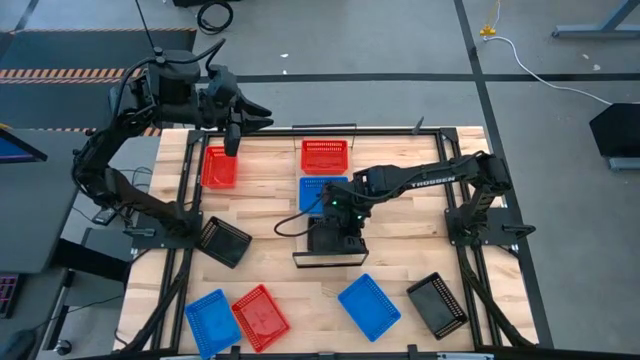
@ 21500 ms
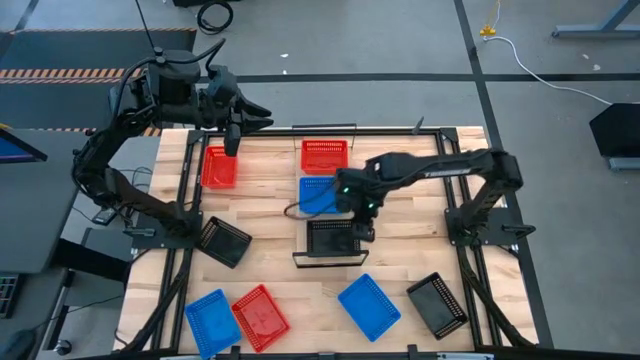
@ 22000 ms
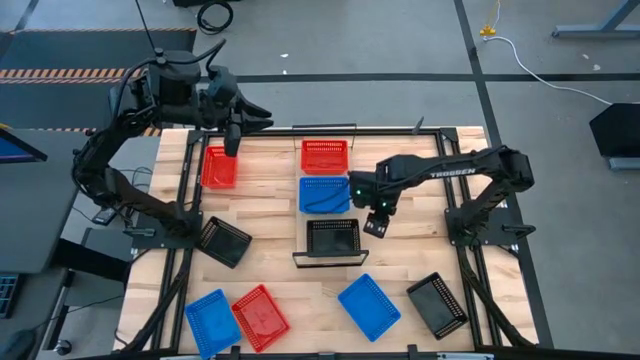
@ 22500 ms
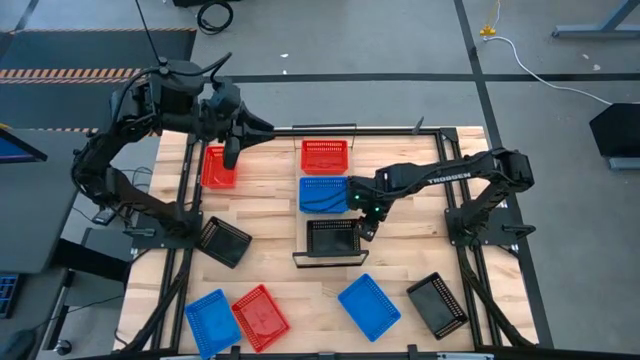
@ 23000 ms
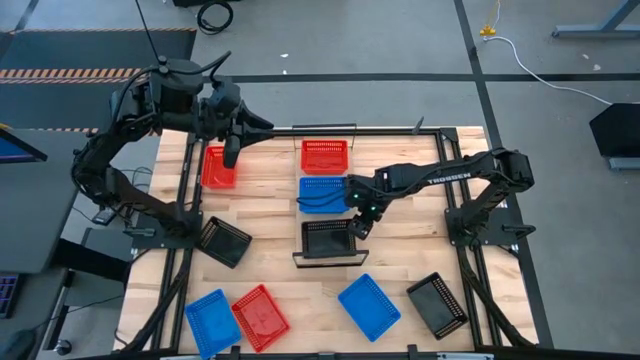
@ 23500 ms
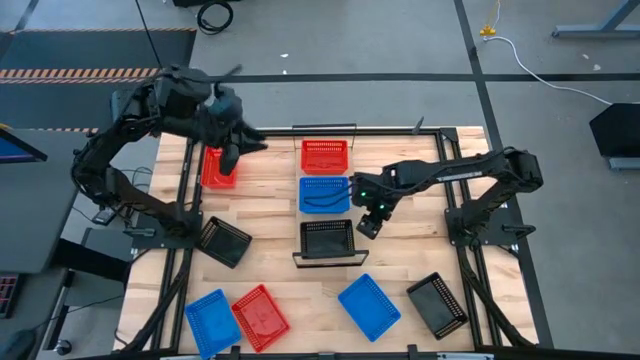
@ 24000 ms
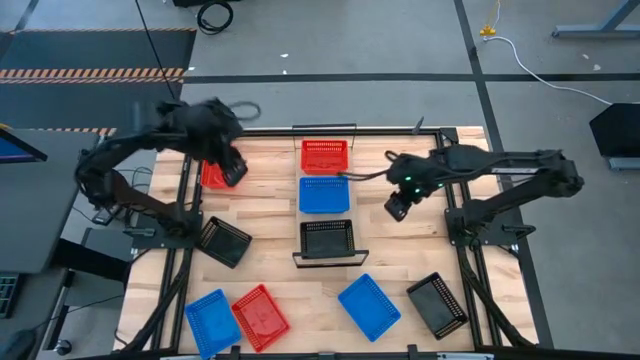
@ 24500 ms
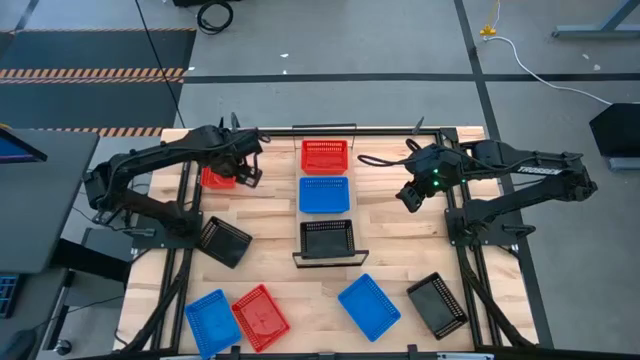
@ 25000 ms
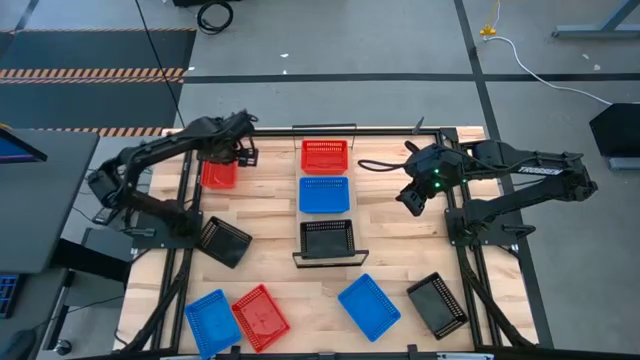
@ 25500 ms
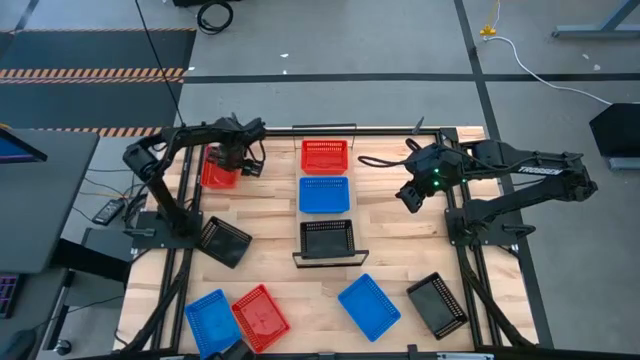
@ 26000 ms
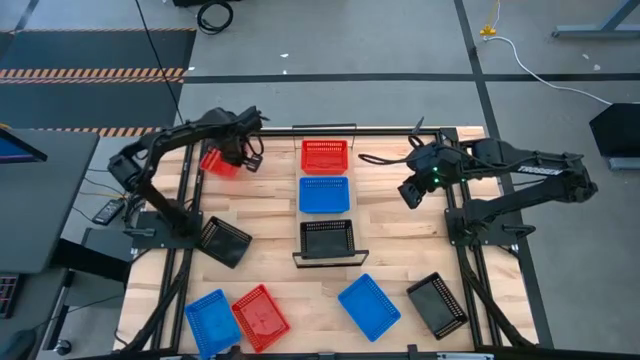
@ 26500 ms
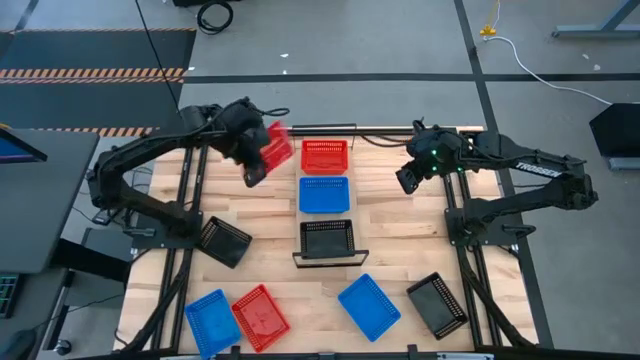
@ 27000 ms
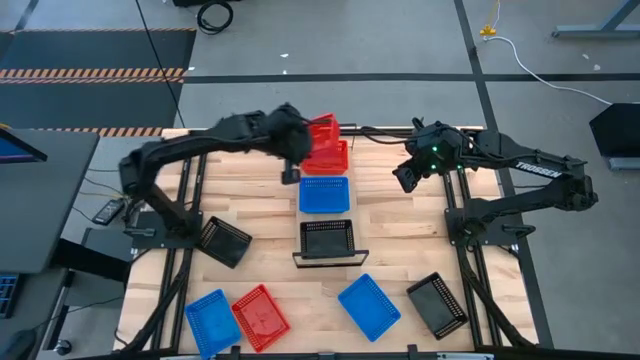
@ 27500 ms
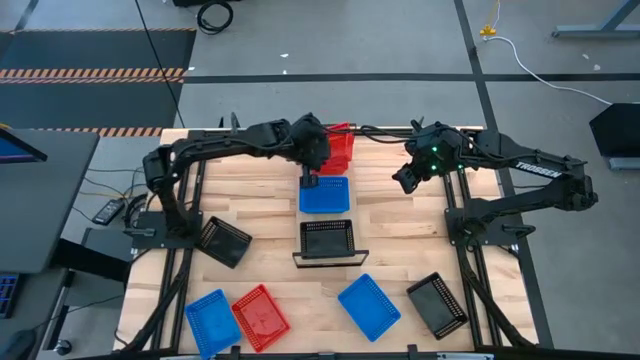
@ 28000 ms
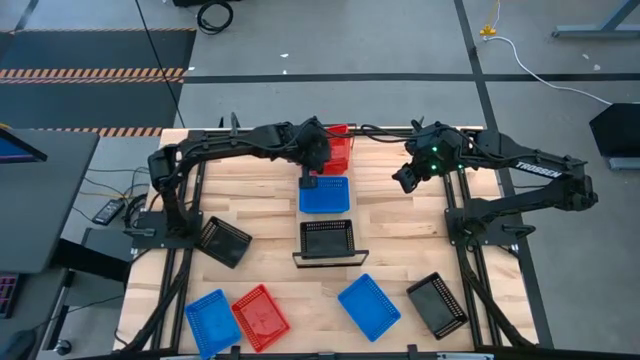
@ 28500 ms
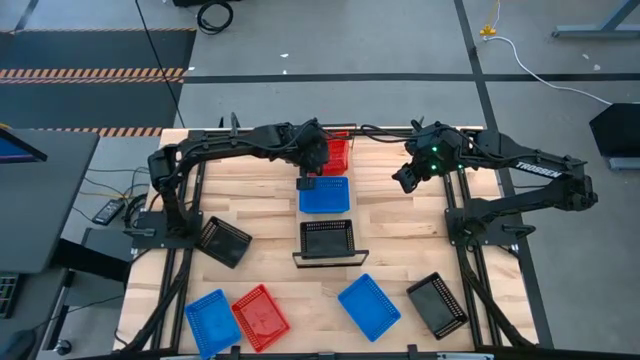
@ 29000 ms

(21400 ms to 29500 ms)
Task: Stack baskets on shelf by color
Stack the top red bin on the red bin on the shelf

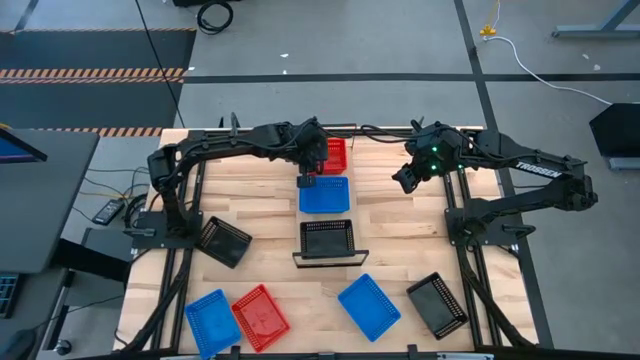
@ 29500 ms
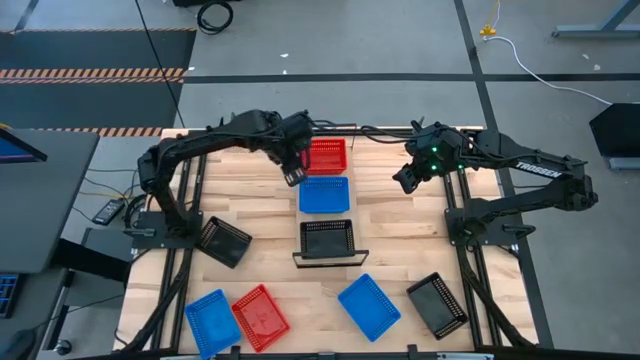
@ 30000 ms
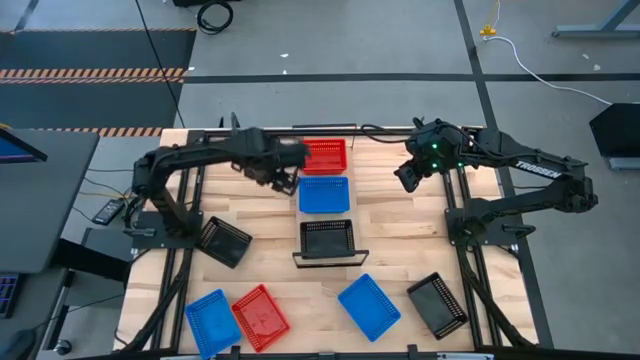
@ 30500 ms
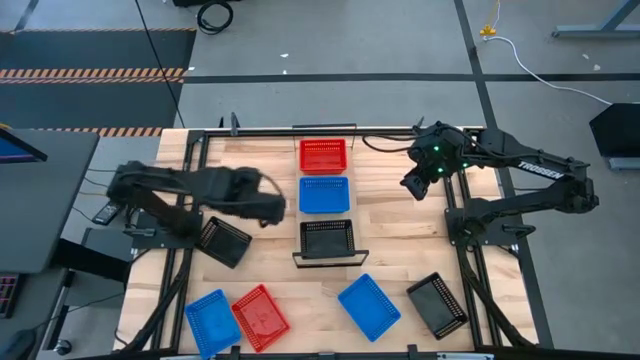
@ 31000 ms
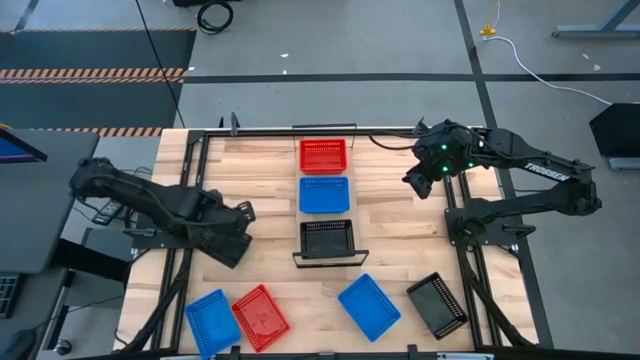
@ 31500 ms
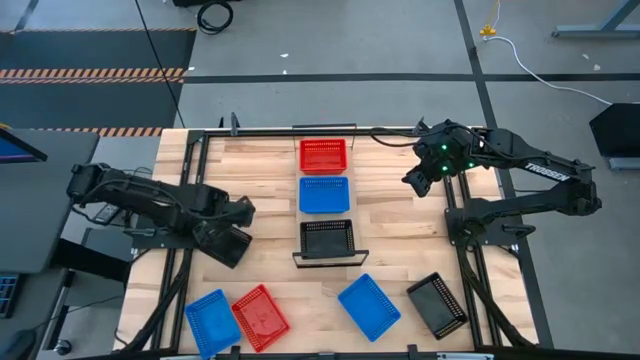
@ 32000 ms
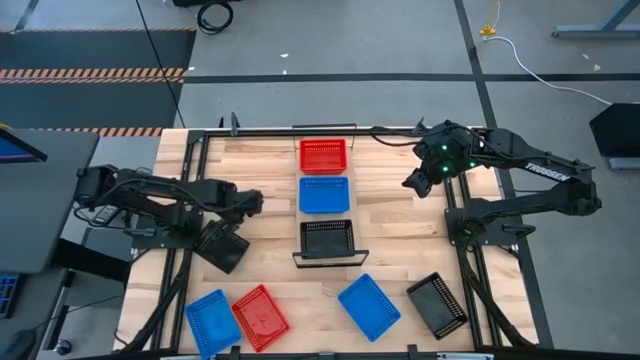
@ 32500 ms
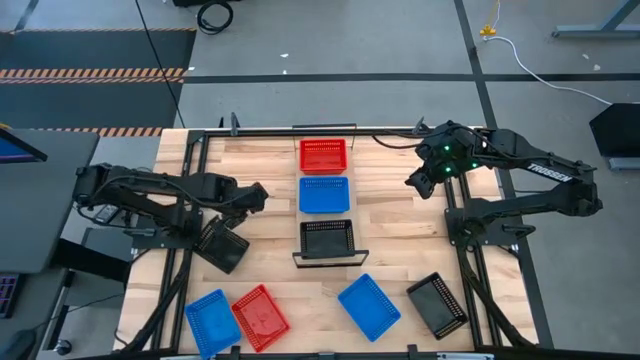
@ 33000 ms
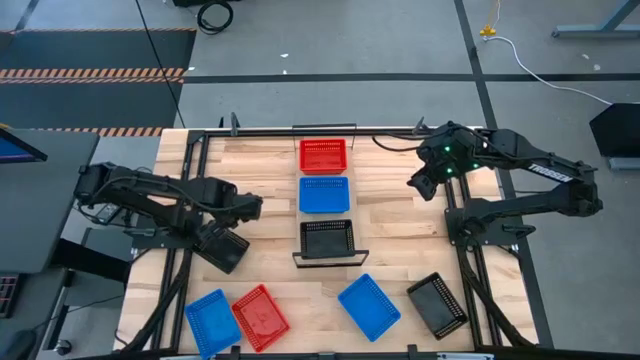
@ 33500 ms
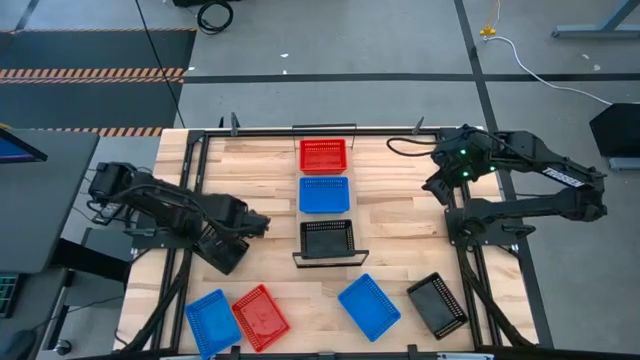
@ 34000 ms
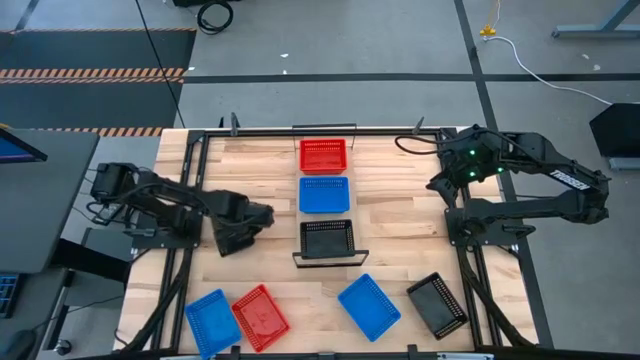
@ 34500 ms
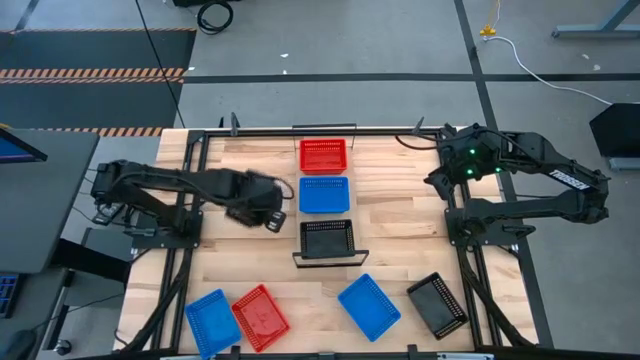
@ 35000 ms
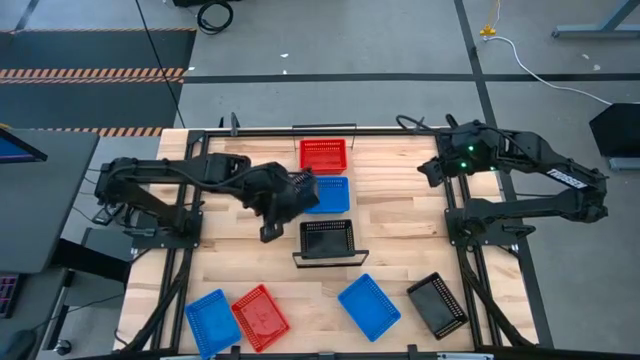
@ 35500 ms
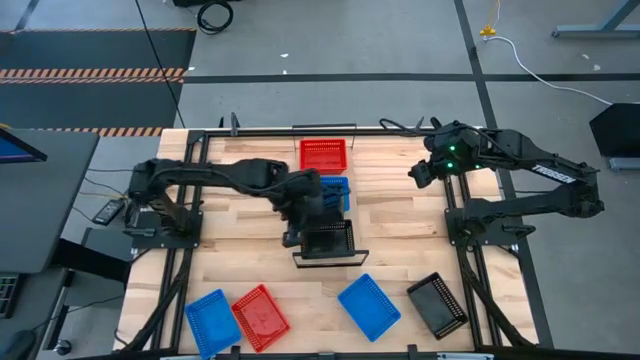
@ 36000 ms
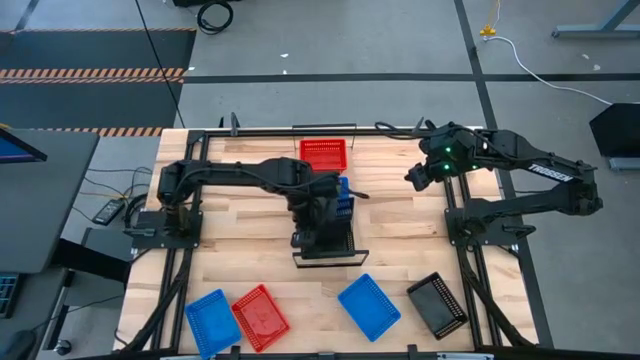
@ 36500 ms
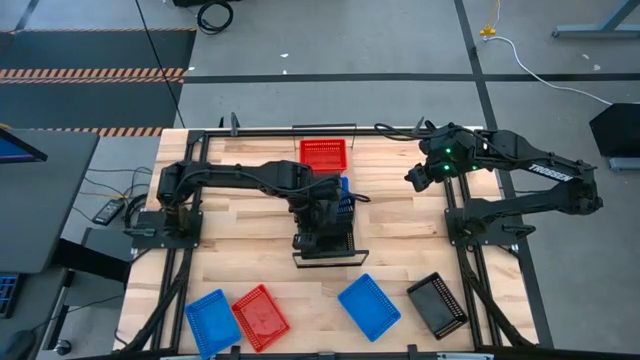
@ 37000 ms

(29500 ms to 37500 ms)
Stack the left black bin on the black bin on the shelf

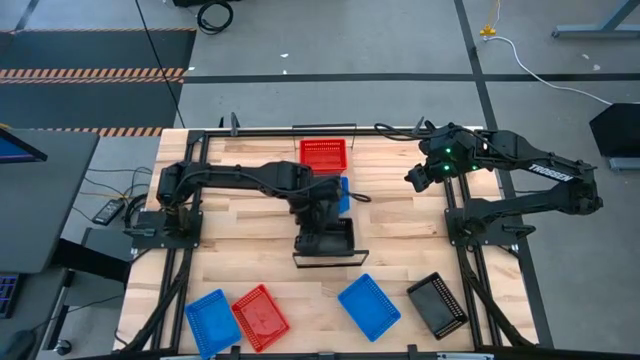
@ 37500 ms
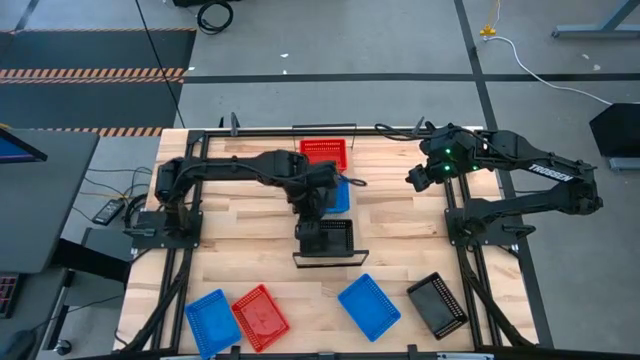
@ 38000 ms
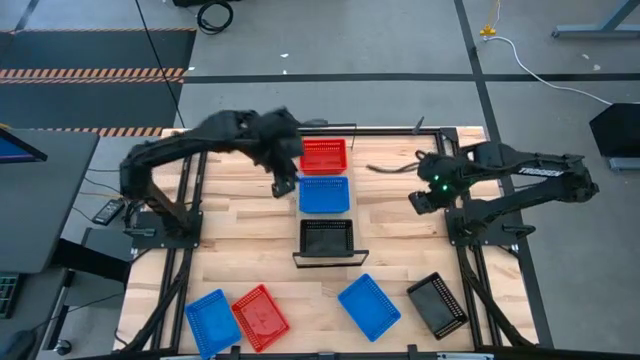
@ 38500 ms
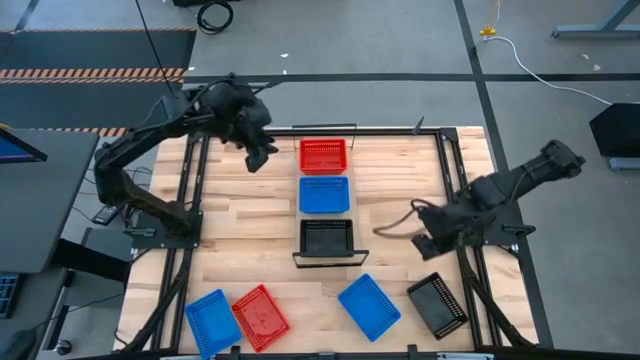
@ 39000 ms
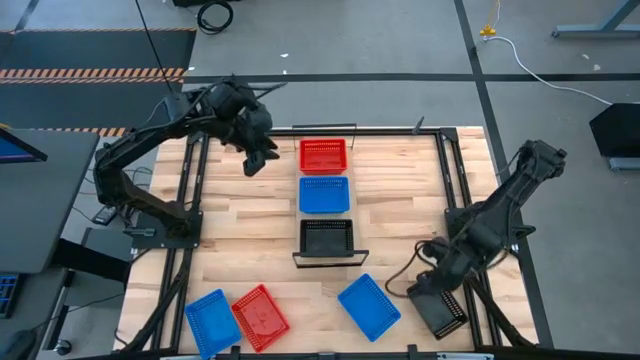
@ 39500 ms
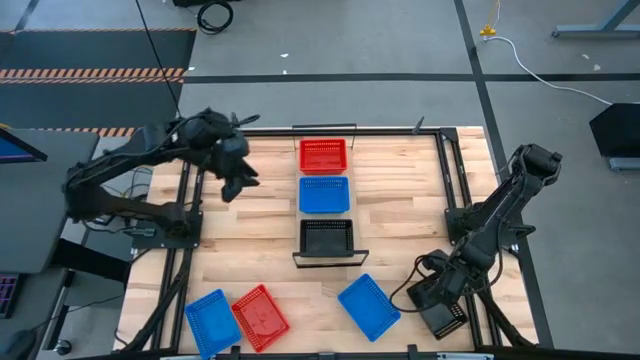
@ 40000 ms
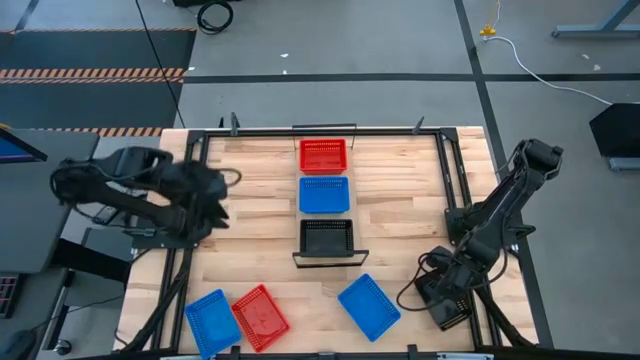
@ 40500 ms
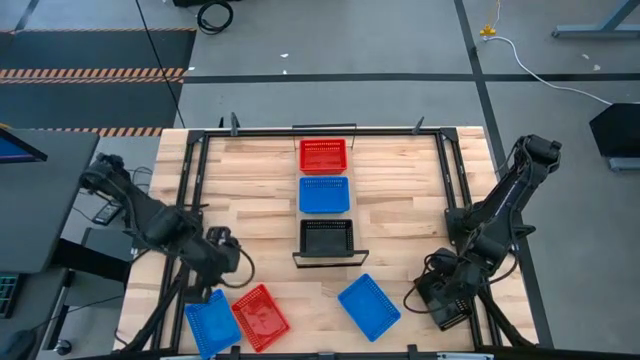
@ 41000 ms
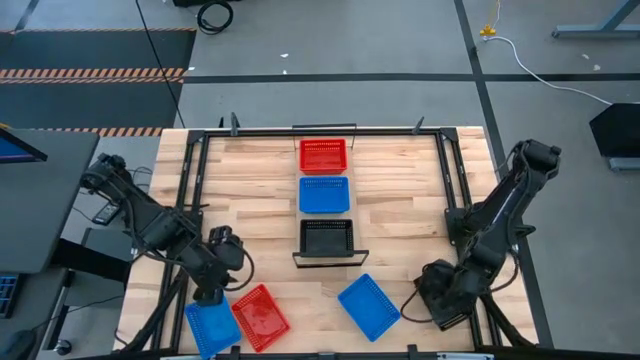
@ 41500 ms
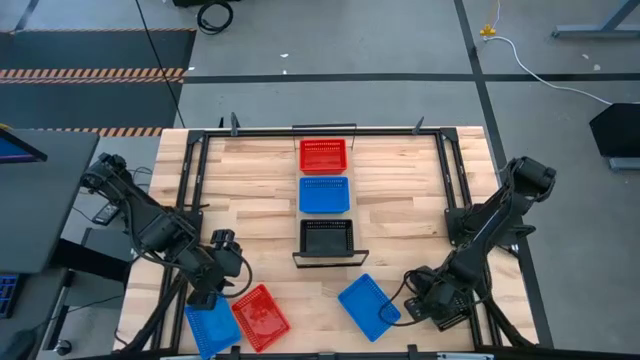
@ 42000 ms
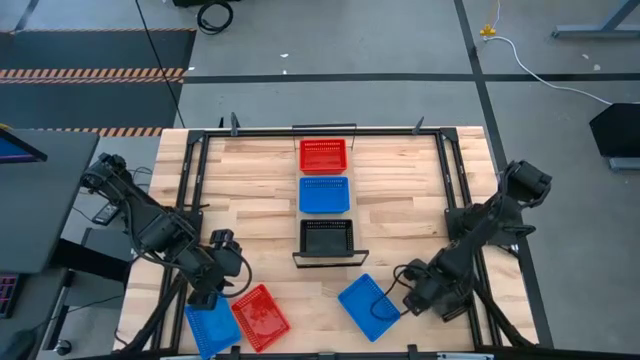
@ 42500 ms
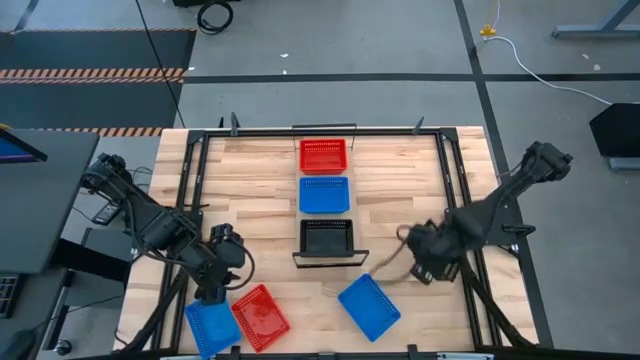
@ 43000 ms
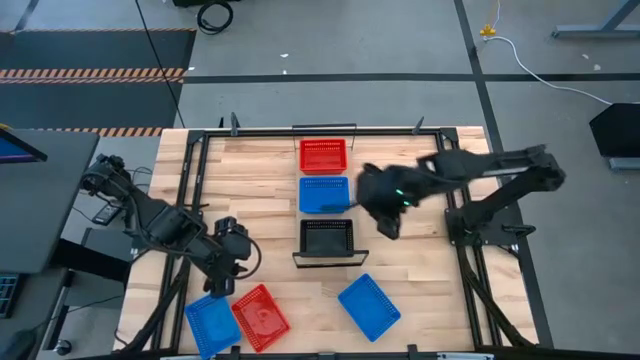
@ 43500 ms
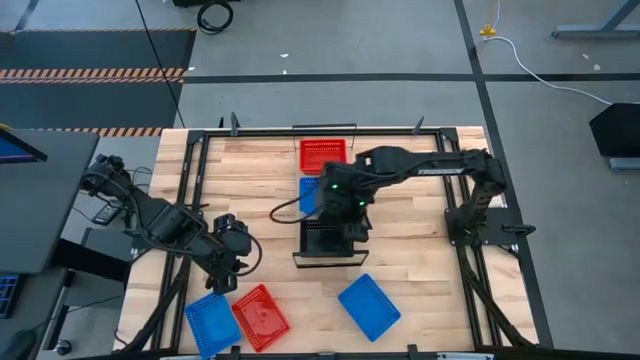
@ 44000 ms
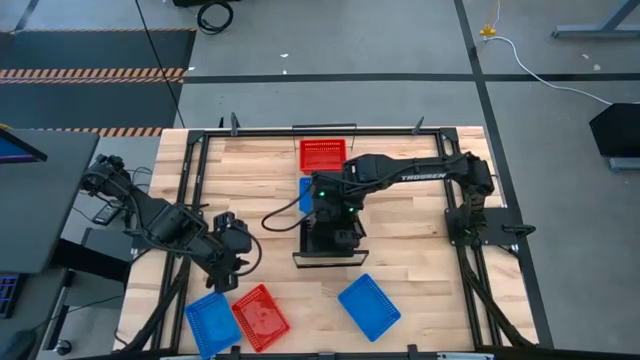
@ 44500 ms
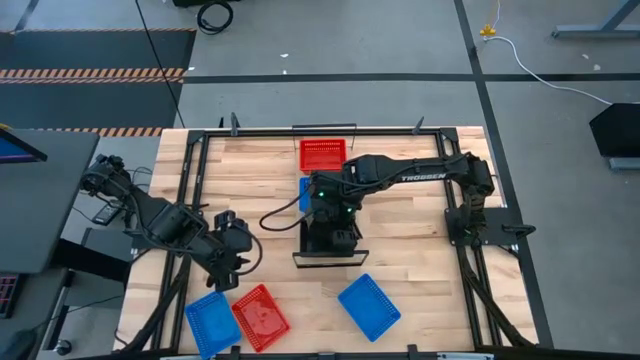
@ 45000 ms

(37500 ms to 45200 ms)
Stack the black bin on the black bins on the shelf
